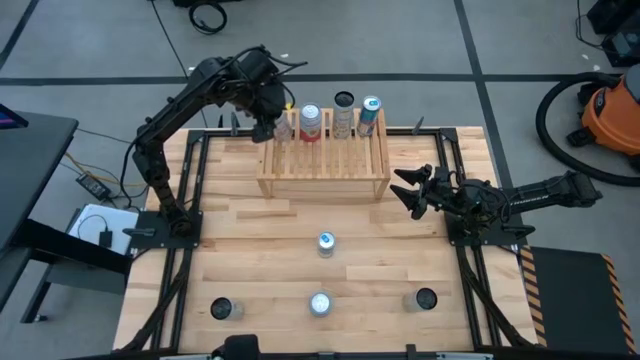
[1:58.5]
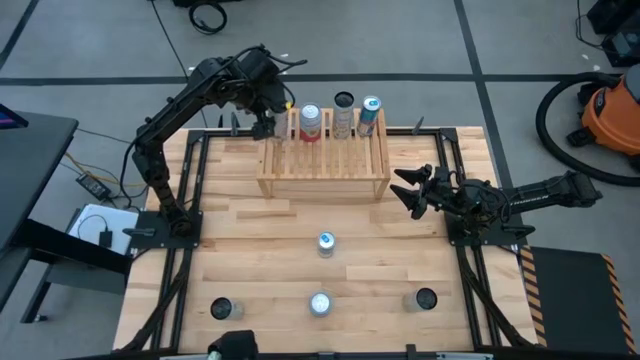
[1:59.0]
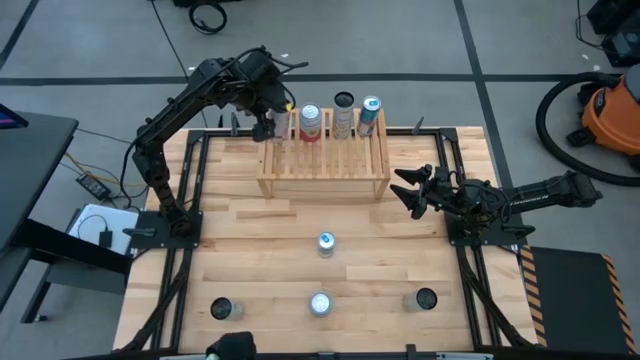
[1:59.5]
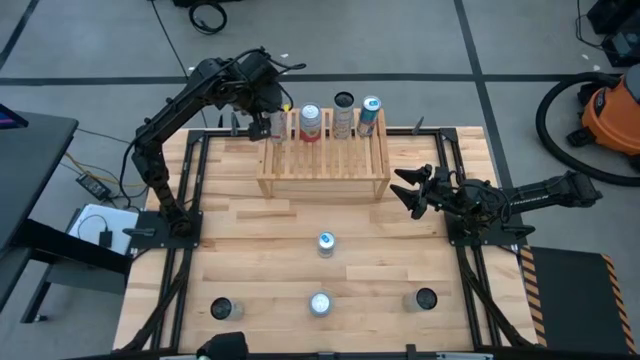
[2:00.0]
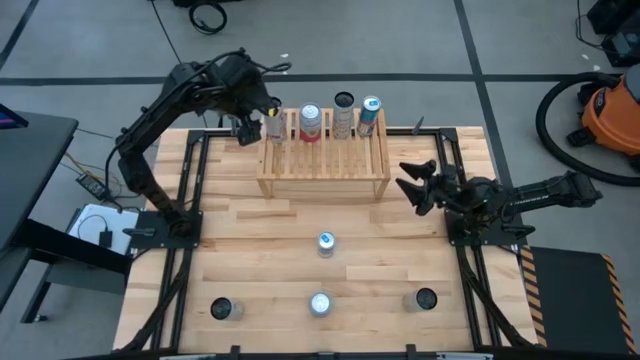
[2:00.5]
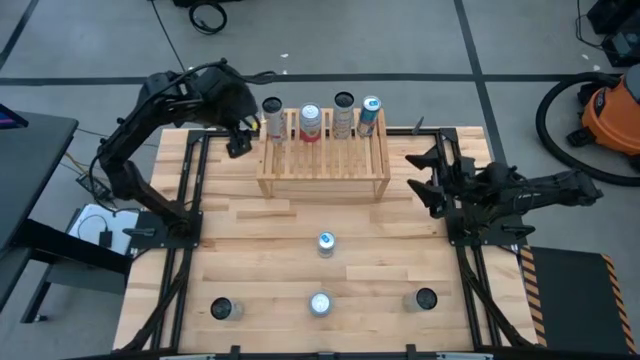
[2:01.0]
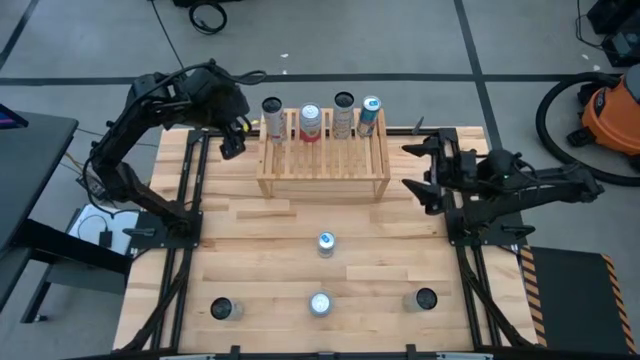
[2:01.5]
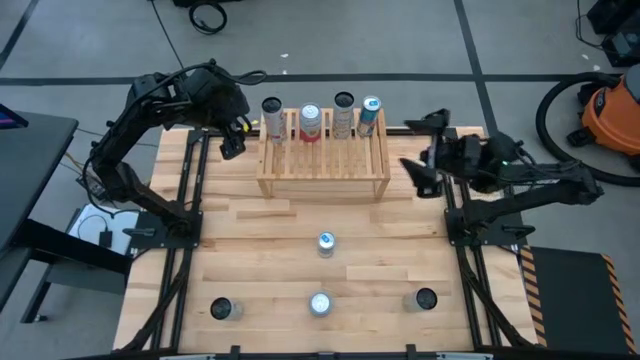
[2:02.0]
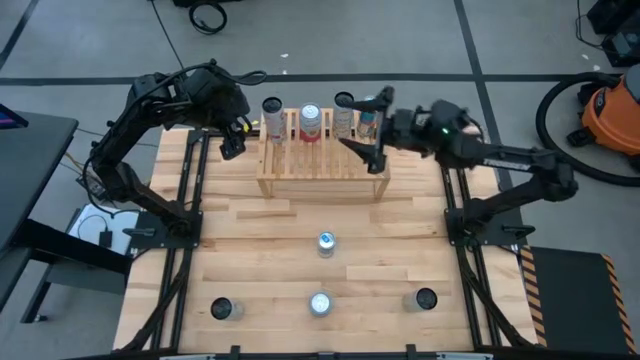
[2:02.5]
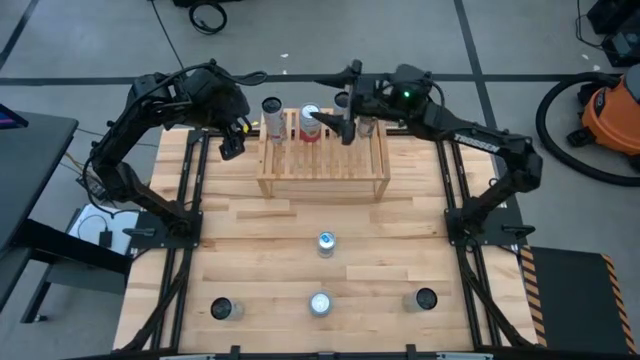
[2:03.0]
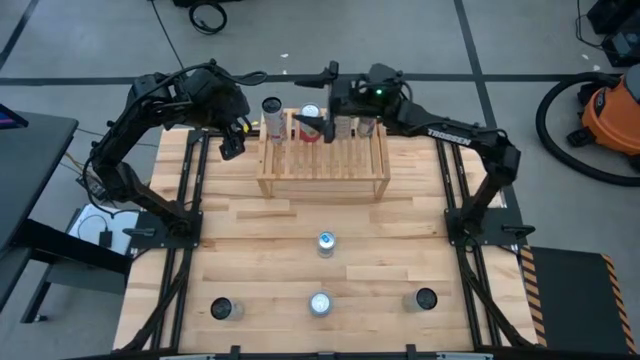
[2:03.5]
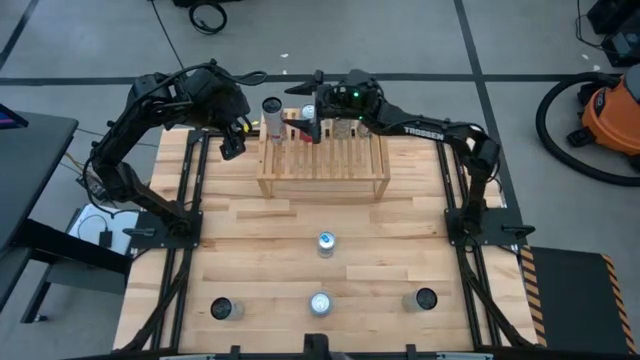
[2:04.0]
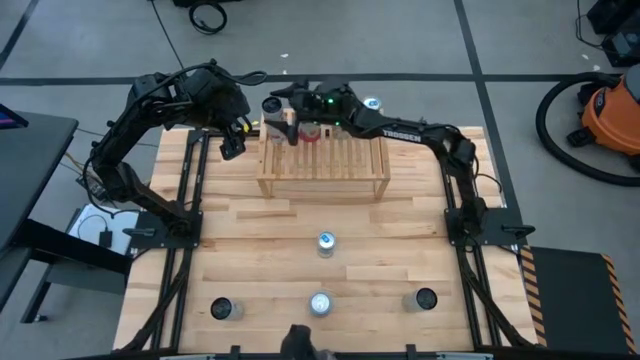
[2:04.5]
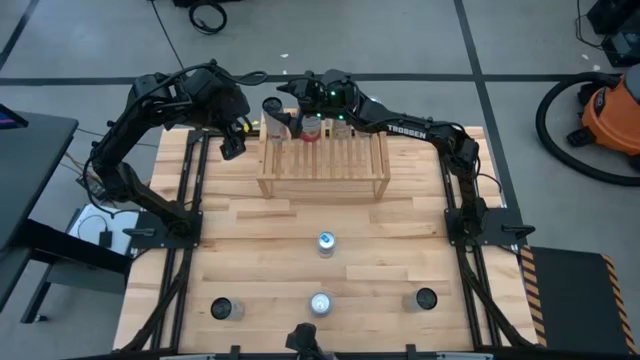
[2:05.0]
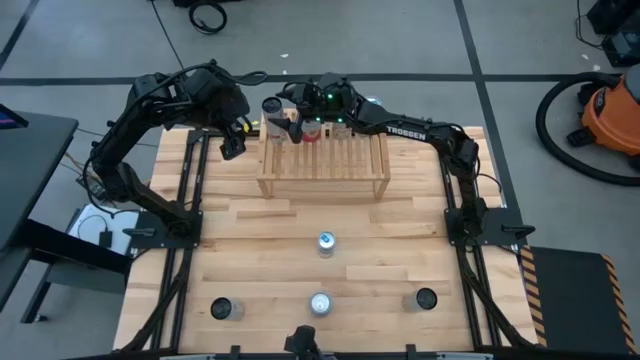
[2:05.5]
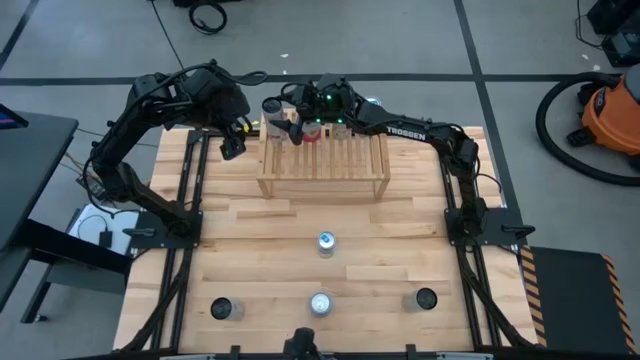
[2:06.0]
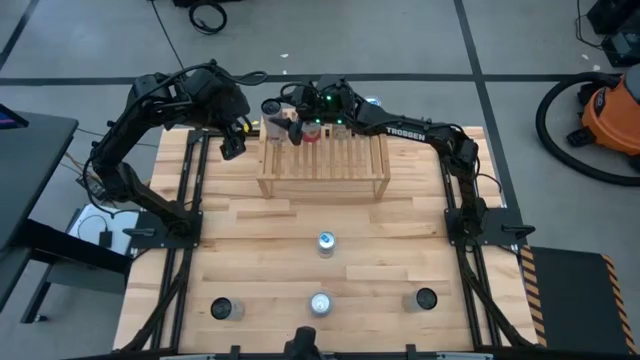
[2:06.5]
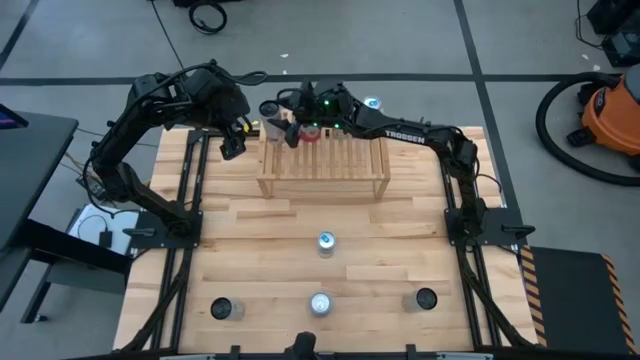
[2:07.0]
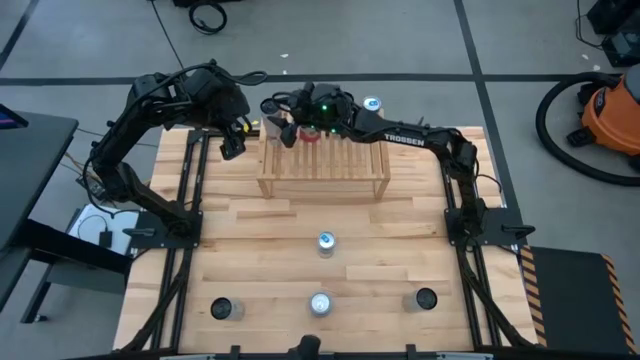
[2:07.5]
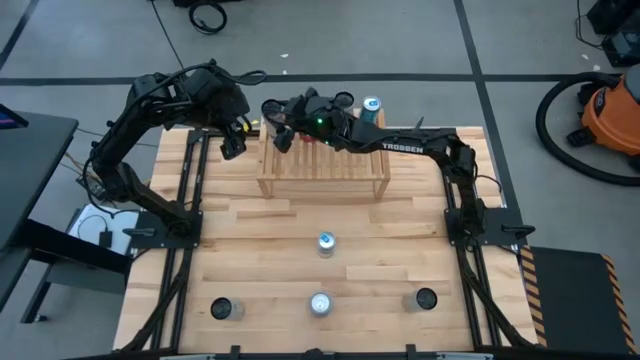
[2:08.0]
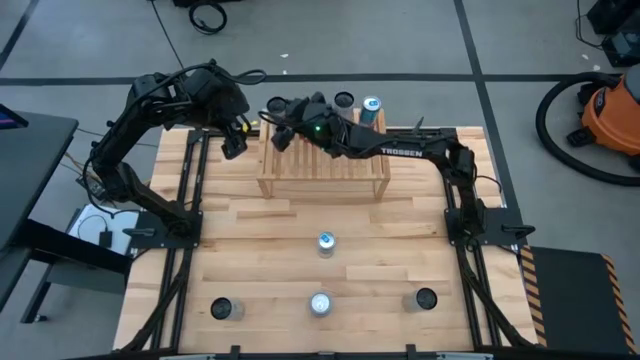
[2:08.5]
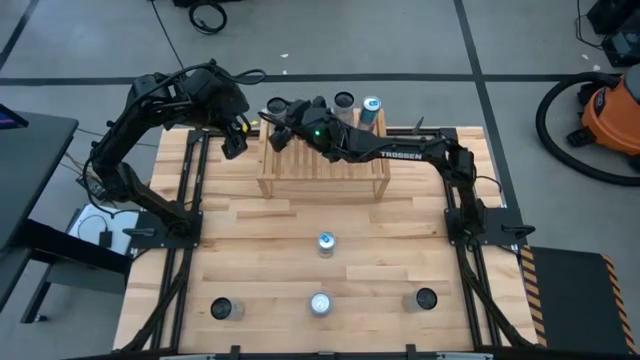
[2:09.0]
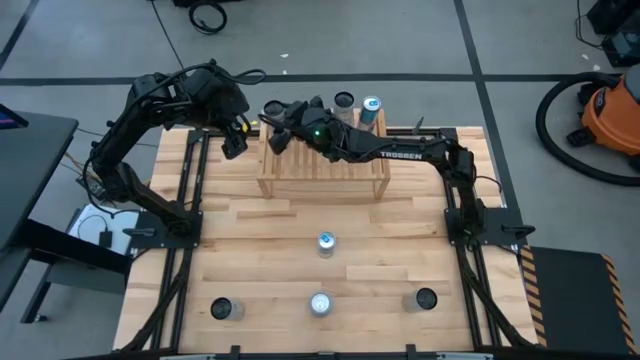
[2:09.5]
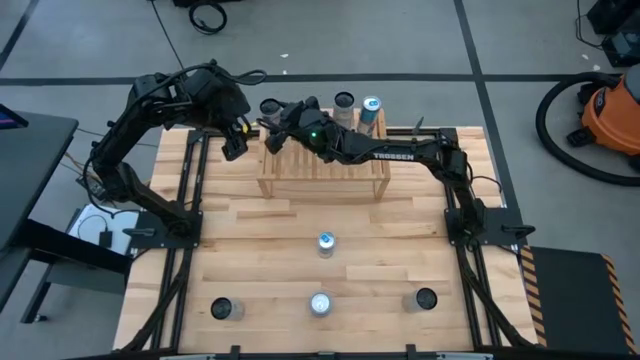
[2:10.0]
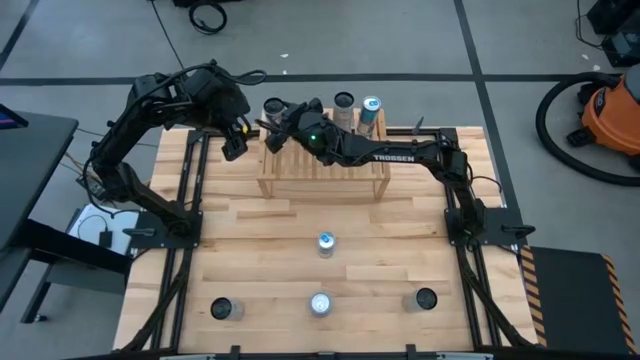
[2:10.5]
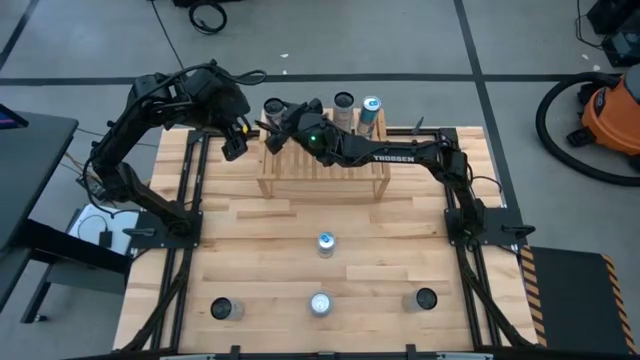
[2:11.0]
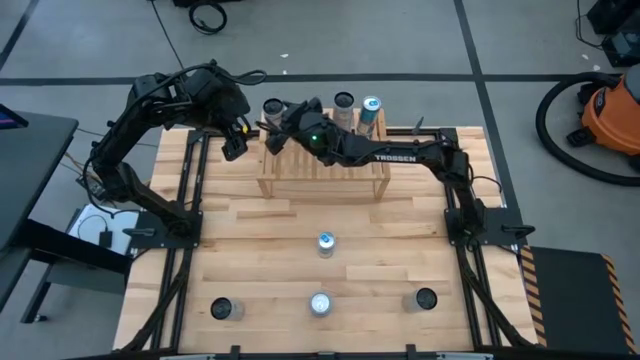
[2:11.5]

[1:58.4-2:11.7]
Task: Place canned beverage on shelf
Put the top white and pink soda can on the shelf

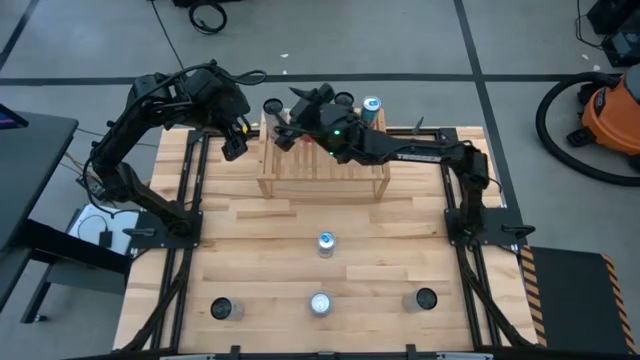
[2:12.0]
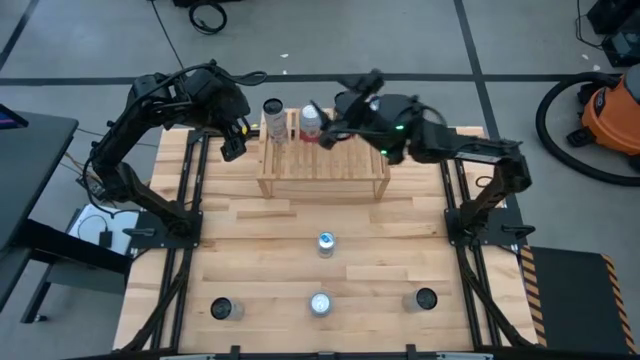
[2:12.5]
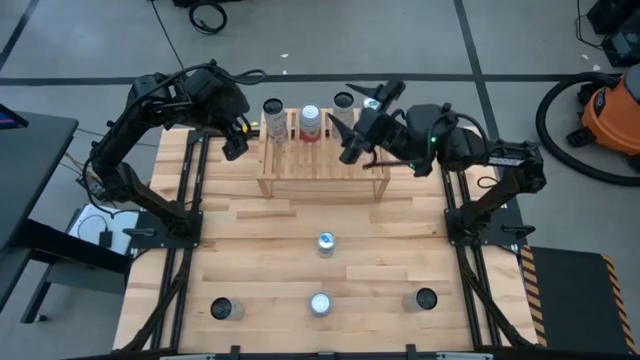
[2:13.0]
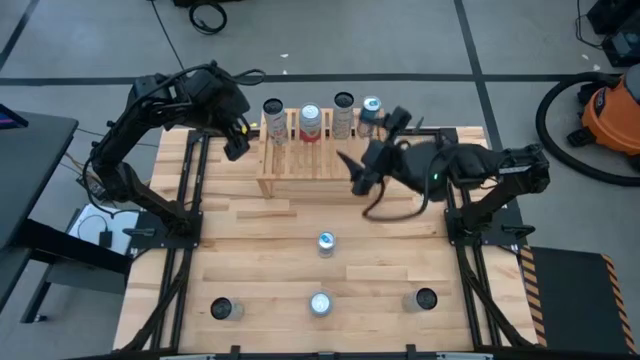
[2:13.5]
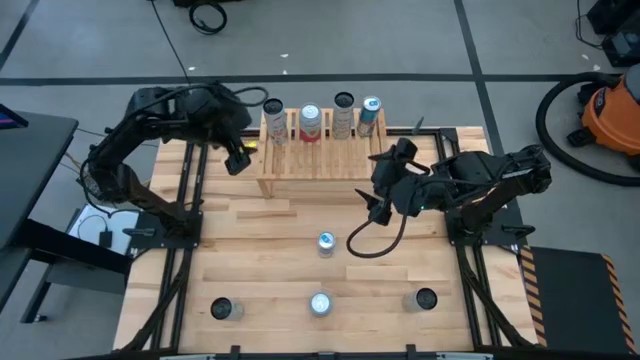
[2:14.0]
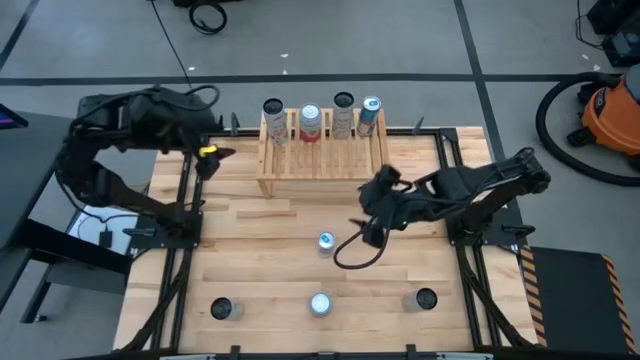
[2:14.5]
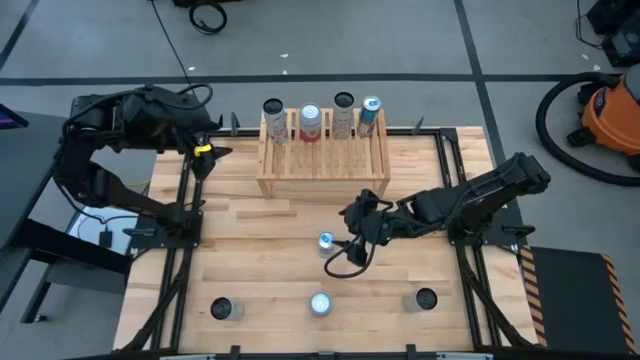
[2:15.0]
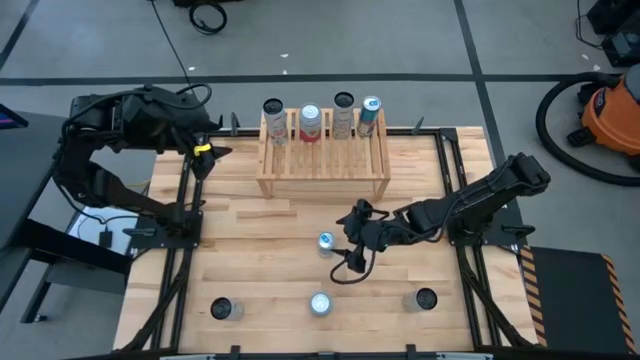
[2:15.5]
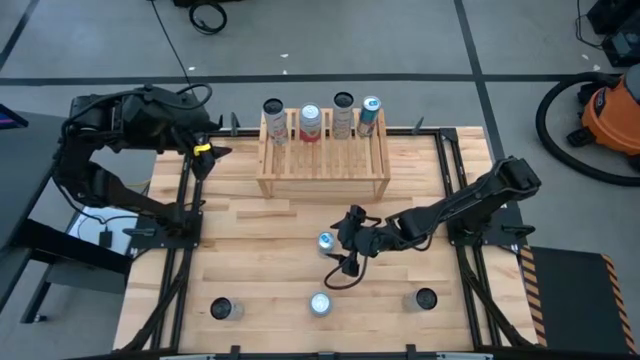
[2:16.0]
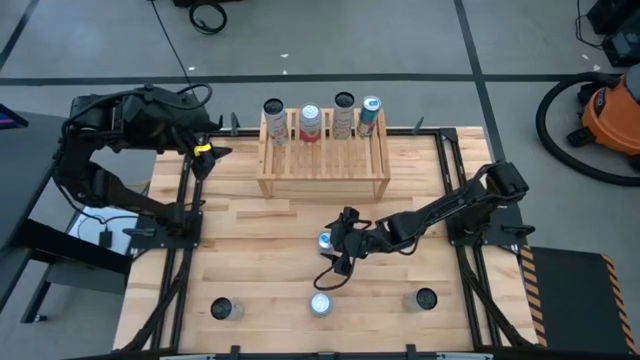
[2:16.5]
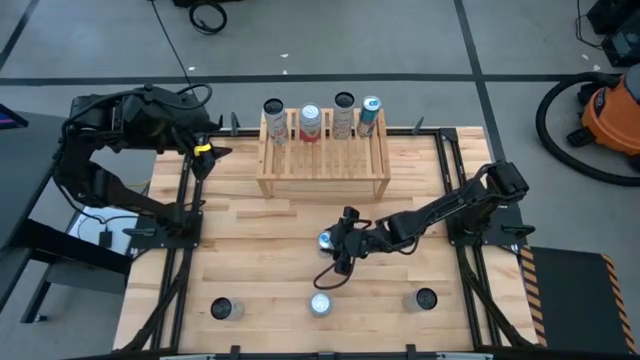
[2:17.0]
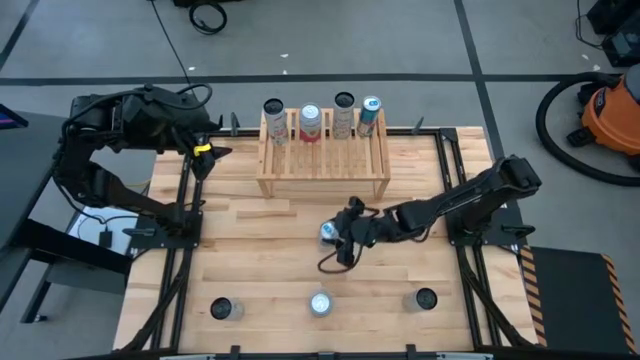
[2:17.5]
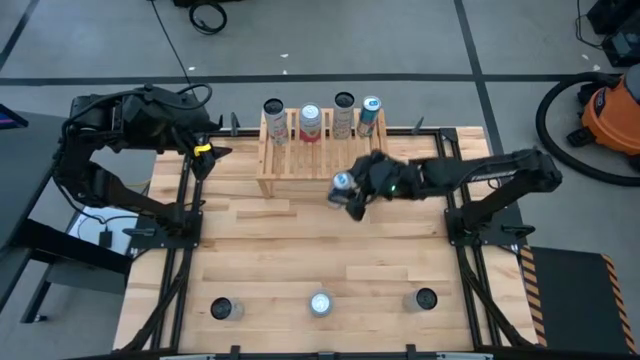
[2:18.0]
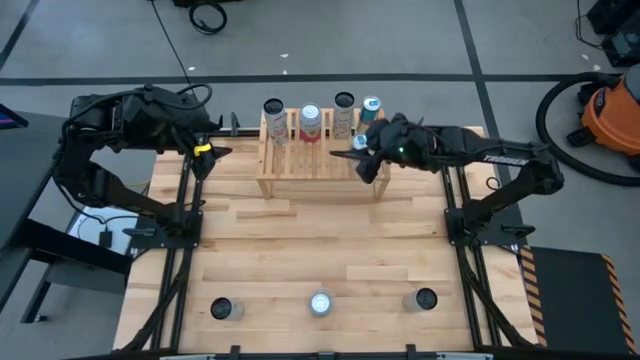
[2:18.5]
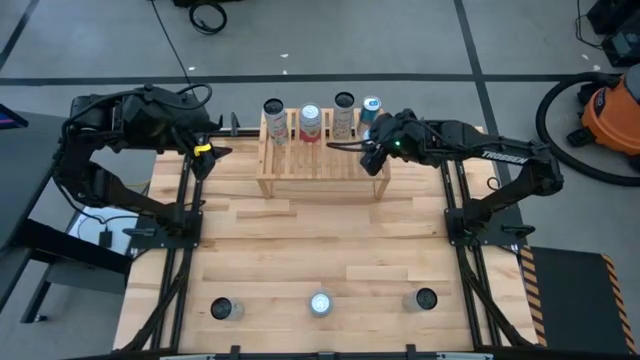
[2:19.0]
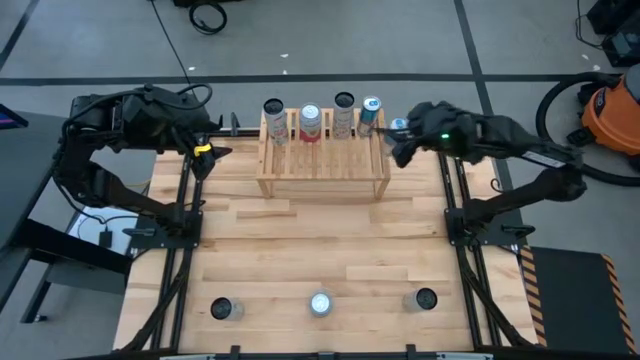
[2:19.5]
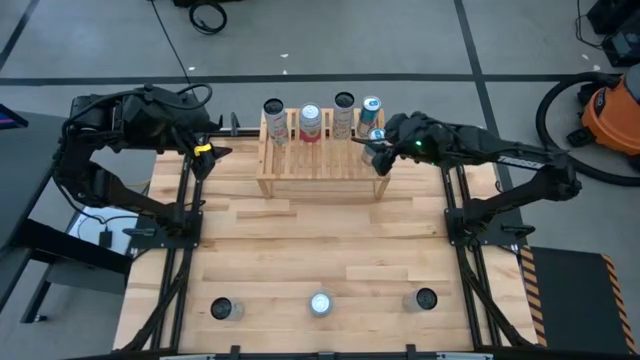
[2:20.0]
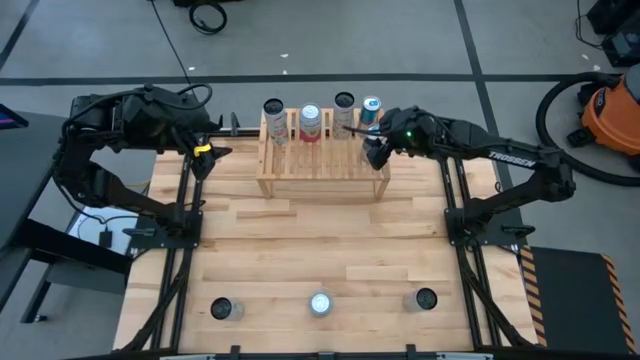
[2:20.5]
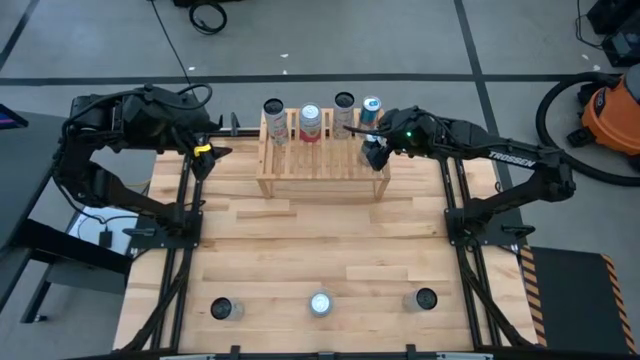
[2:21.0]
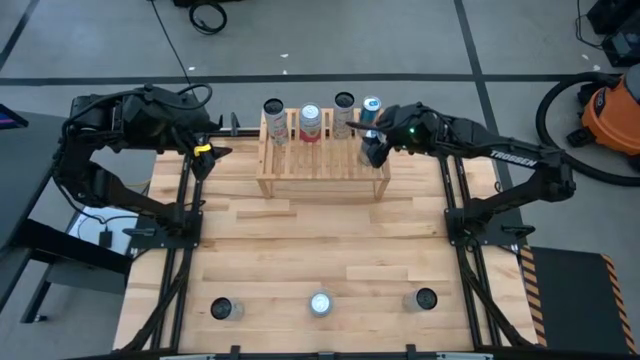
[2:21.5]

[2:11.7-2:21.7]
Put the blue soda can on the shelf aligned with the other blue soda can
